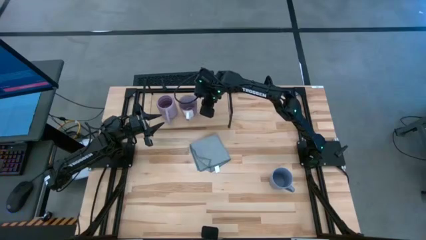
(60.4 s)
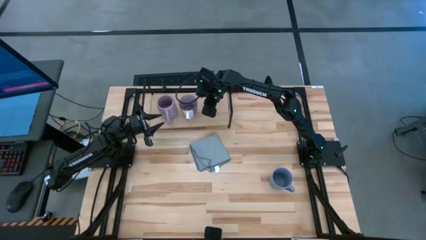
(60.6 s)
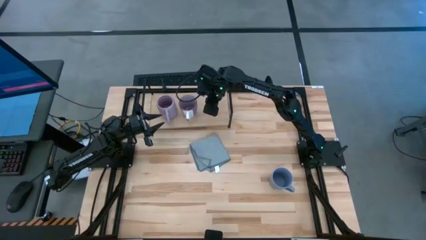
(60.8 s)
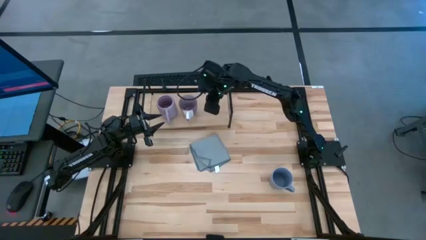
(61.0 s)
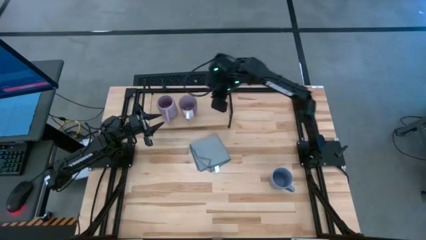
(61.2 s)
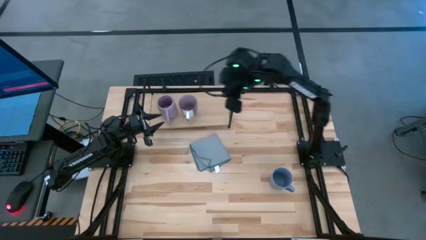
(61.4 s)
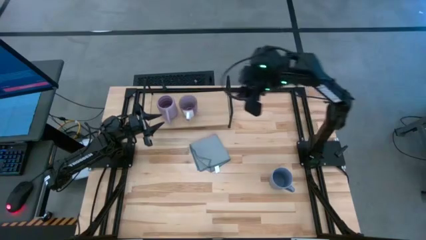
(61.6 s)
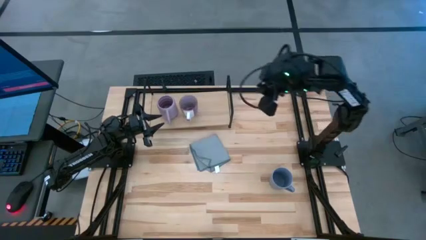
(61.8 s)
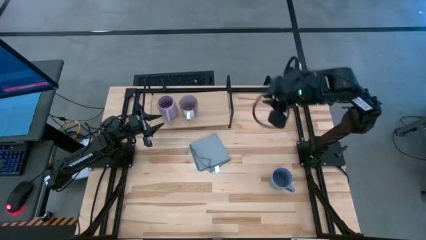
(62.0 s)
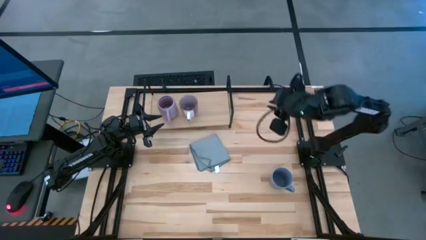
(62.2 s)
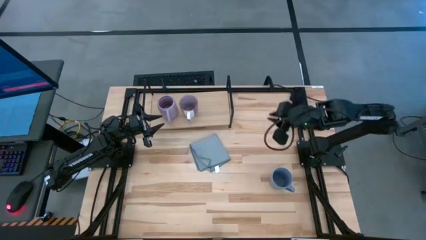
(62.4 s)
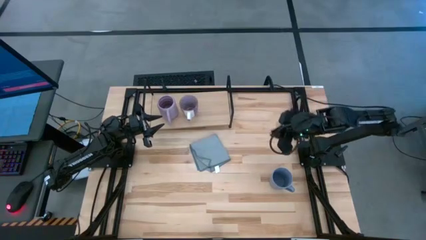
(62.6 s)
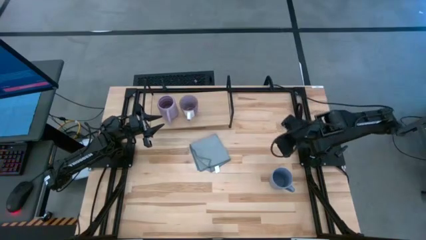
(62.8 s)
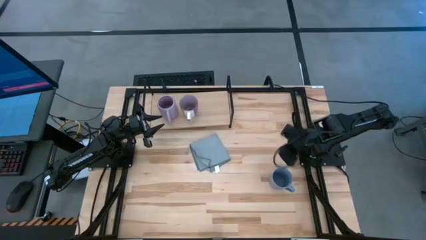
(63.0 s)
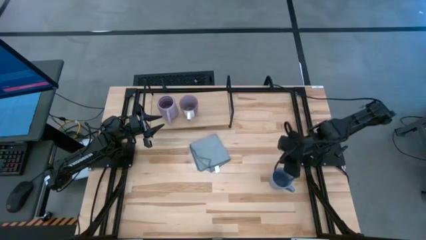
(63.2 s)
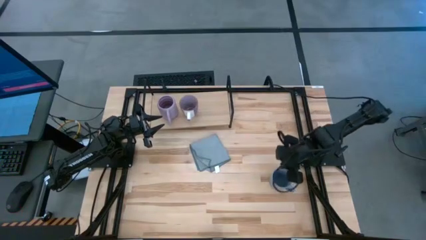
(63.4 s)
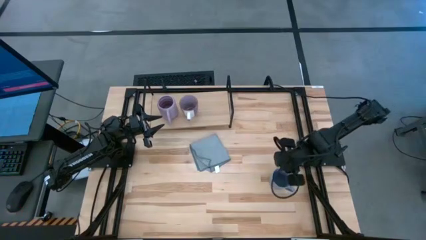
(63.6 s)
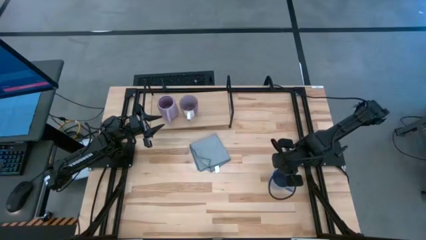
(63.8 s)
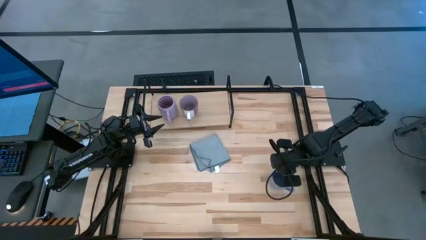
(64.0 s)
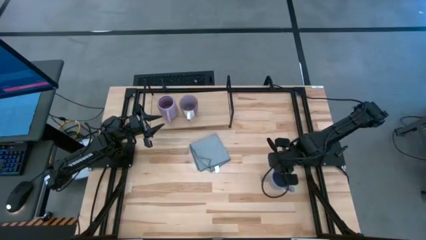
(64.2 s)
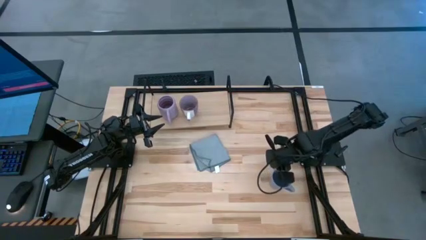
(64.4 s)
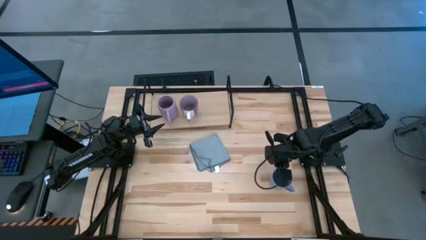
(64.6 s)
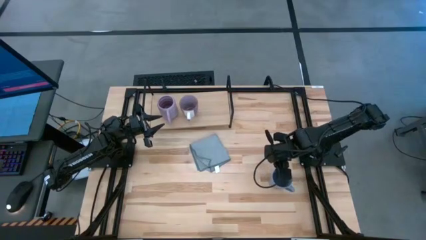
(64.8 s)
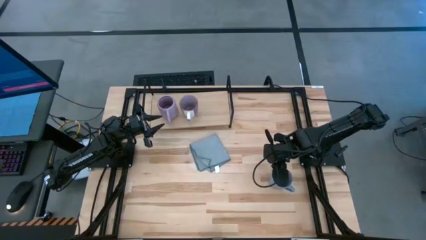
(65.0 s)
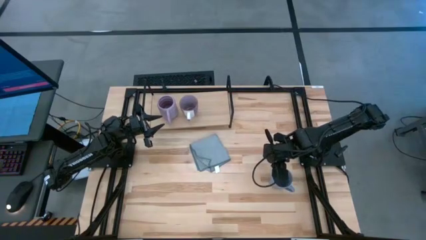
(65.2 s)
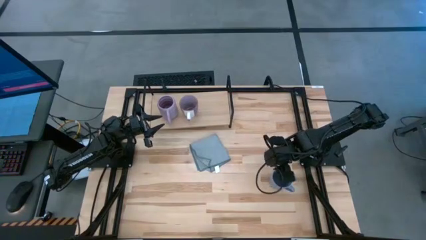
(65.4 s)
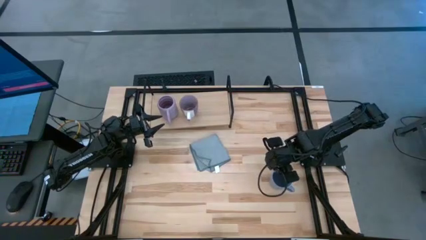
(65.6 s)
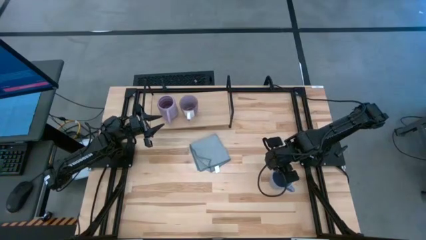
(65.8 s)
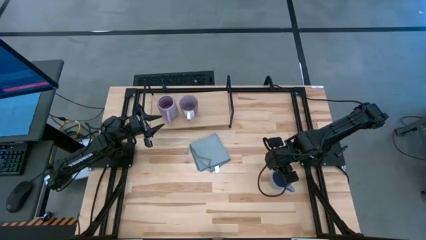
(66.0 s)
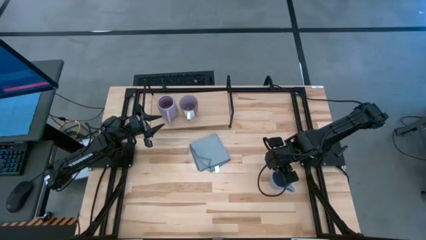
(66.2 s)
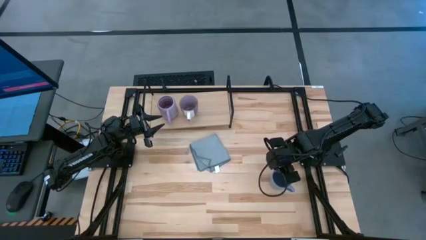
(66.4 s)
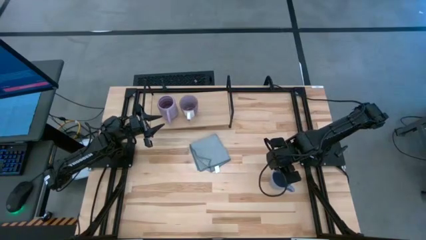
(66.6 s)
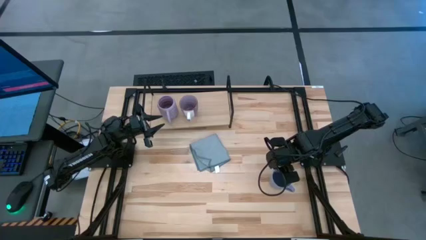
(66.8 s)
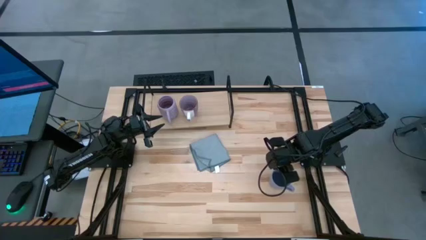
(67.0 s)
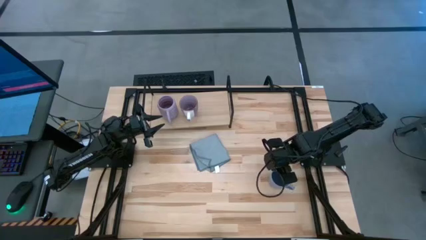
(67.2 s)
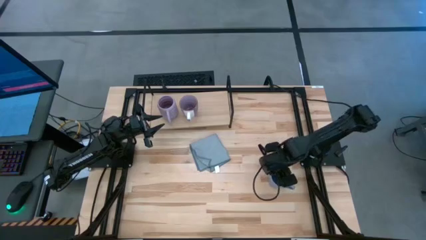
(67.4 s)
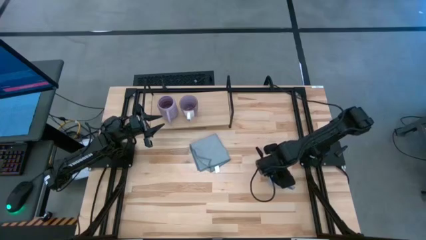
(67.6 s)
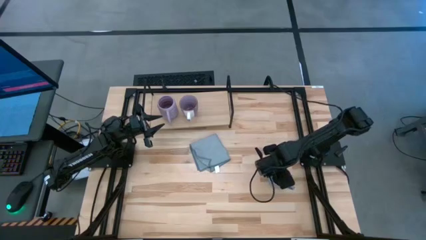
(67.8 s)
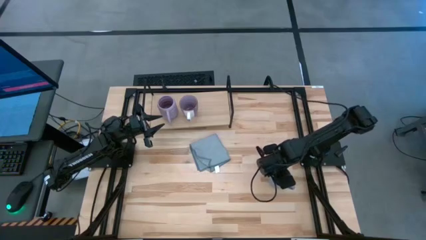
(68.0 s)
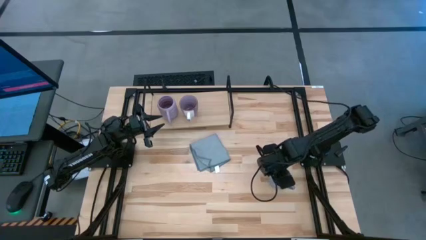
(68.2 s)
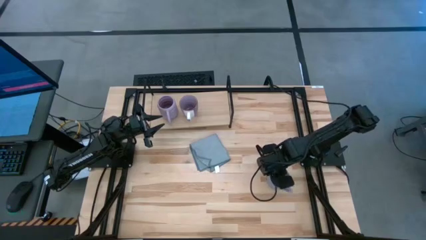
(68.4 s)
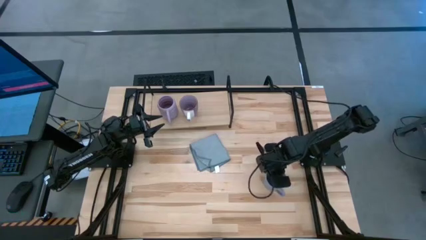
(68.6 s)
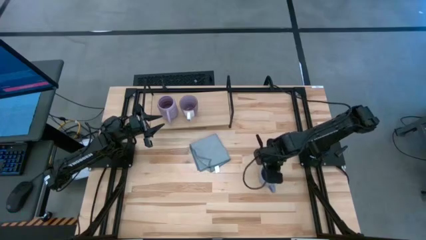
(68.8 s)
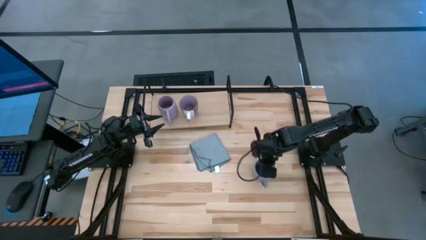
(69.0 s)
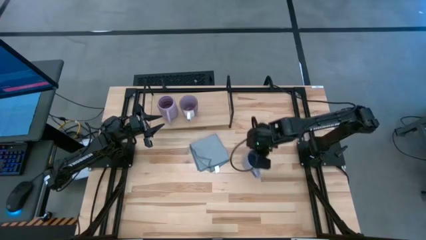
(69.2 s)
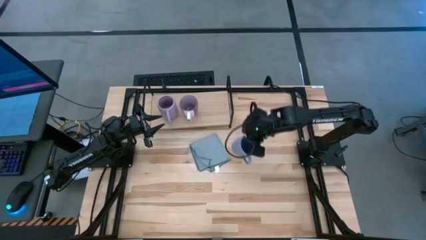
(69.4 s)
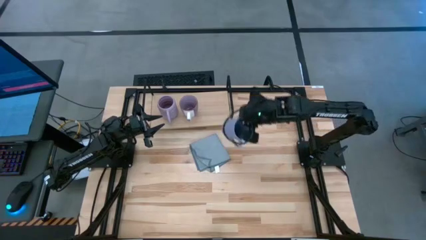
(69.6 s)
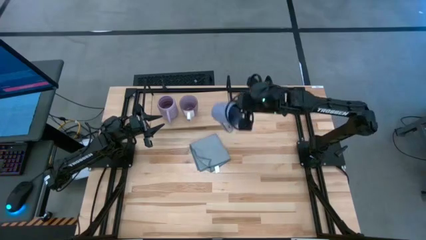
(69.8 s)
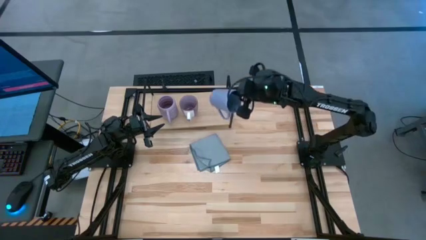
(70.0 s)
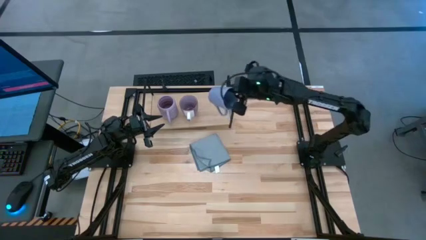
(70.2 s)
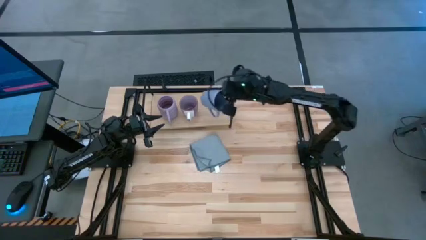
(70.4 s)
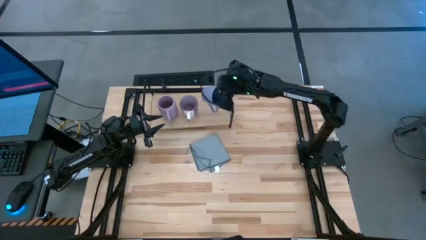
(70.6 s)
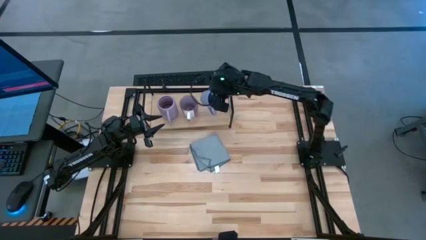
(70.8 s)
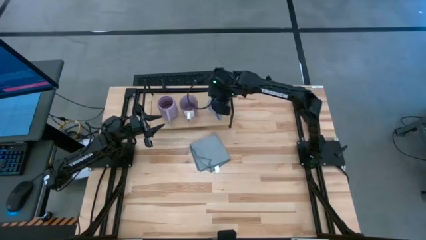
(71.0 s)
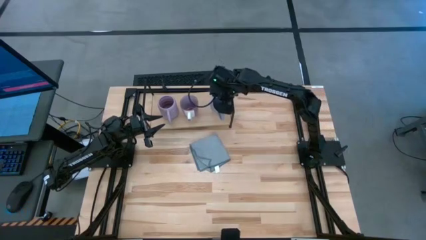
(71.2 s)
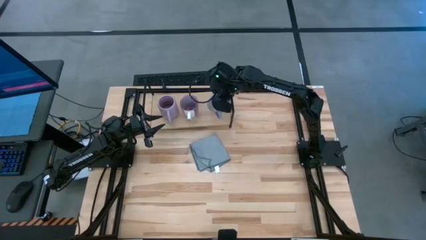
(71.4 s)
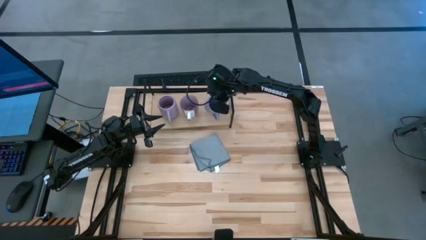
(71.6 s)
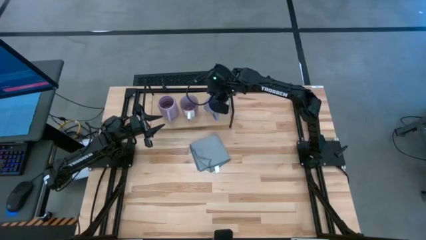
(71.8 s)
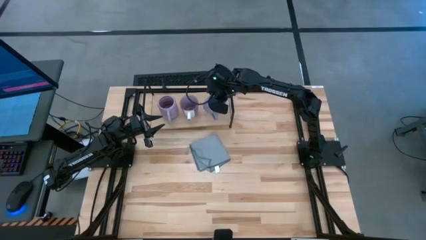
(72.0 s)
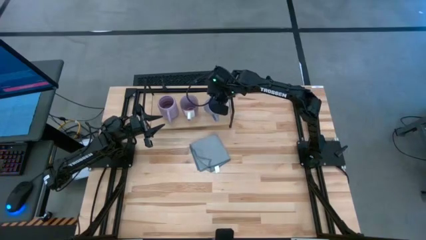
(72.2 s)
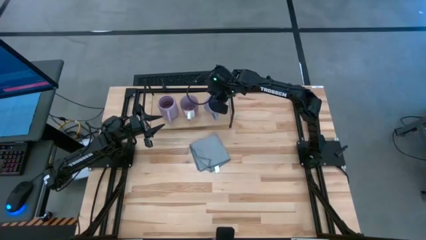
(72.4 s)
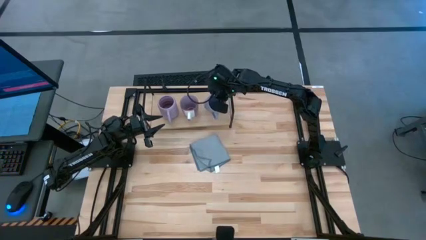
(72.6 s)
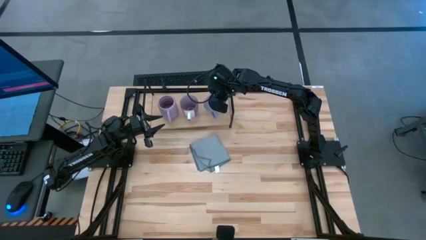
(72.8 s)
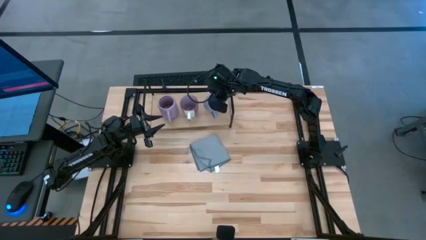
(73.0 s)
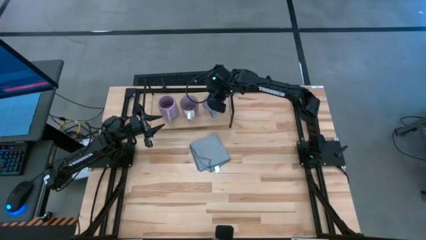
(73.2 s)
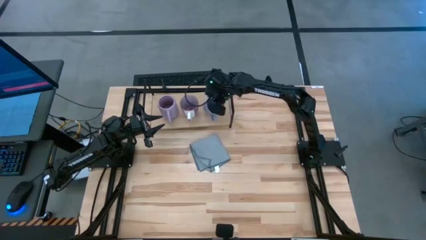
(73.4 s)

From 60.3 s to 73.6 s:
Task: Stack small to large cups/mugs on shelf
Put the blue mug on the shelf

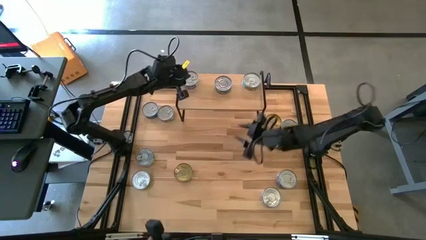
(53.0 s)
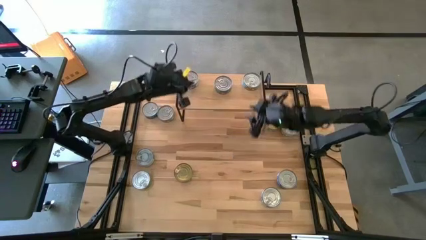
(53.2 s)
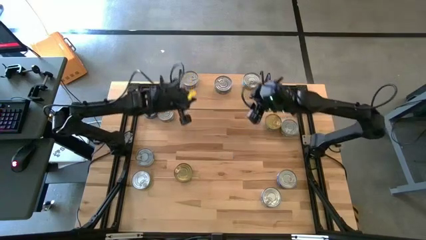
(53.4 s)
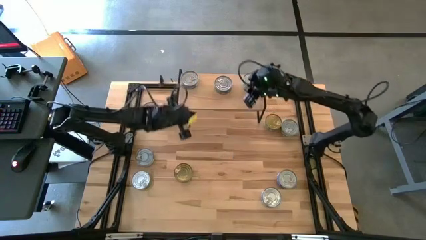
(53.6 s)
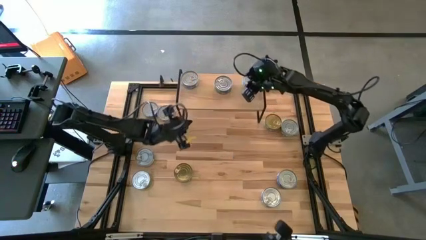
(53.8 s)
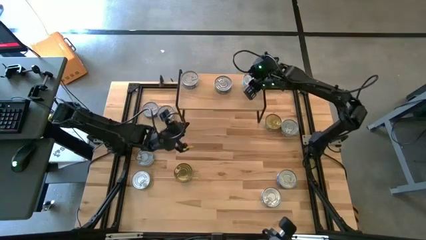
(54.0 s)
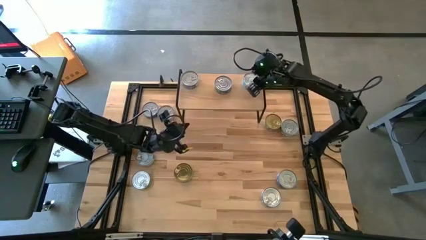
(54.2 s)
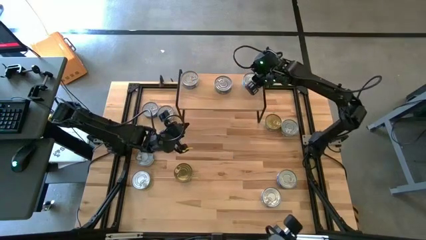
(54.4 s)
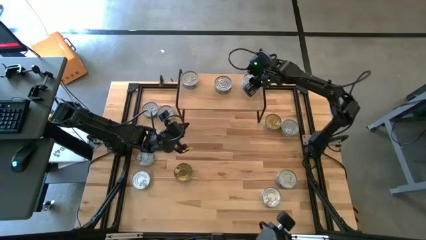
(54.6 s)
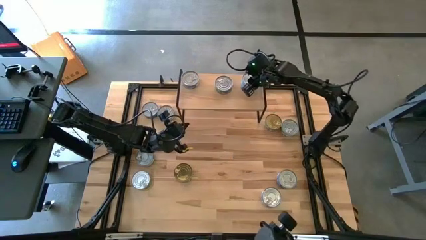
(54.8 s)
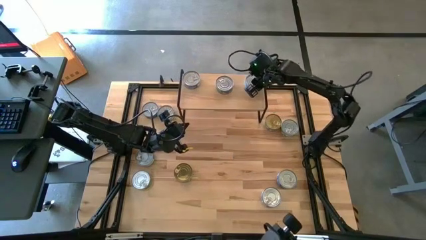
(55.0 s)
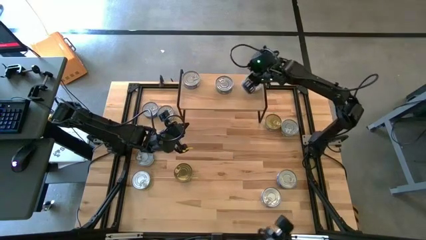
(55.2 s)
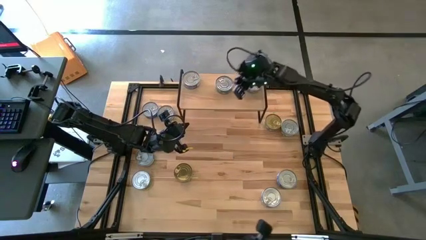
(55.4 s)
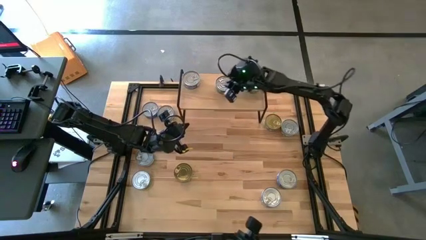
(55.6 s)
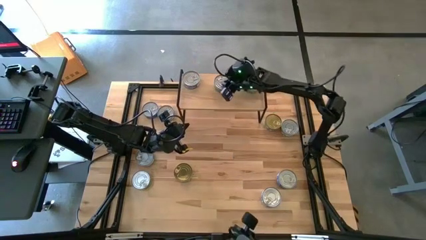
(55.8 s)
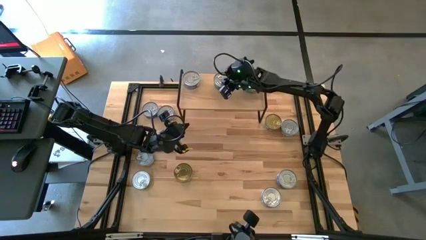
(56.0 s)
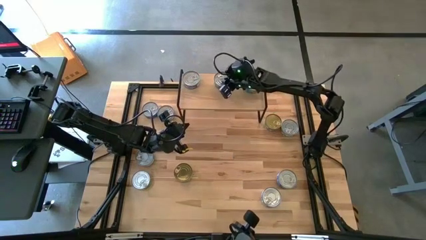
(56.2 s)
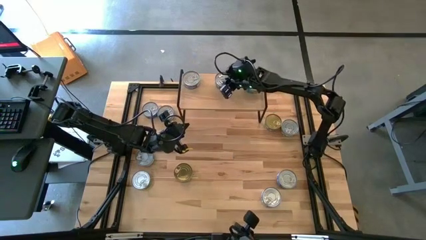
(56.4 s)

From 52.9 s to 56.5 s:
Task: Stack canned seafood by type on shelf
Adjust the tuna cans on the shelf
